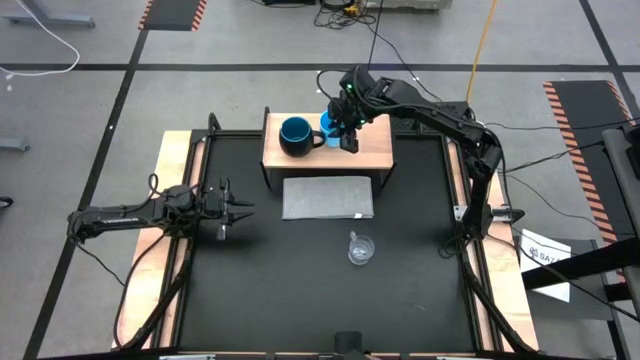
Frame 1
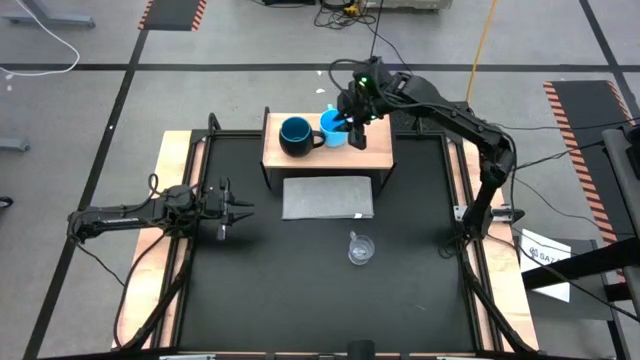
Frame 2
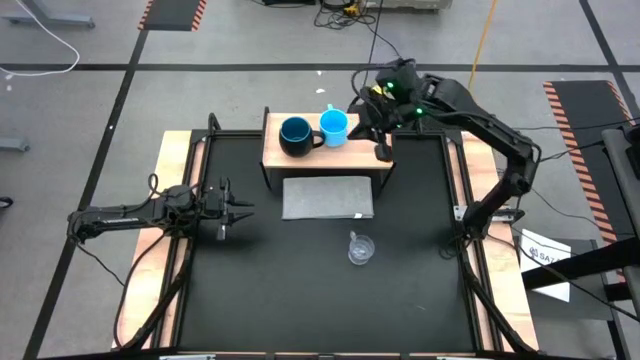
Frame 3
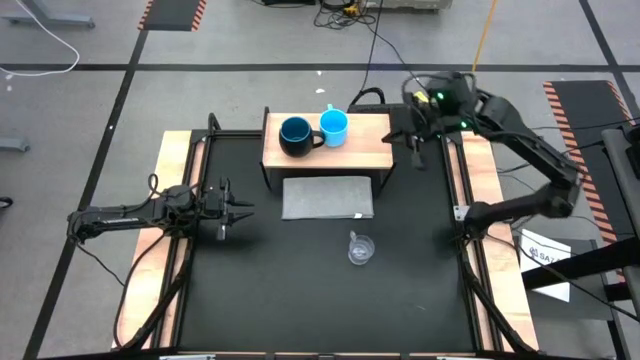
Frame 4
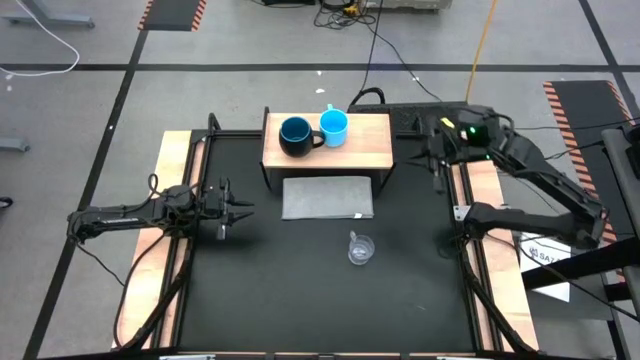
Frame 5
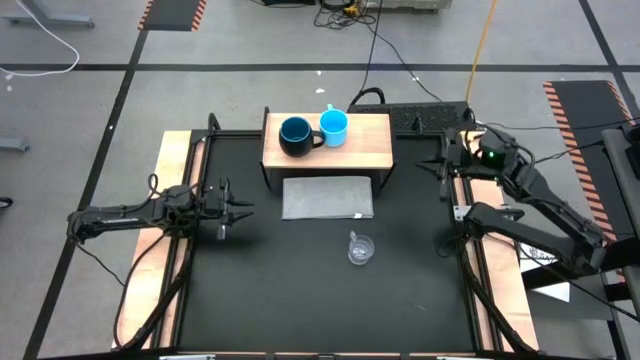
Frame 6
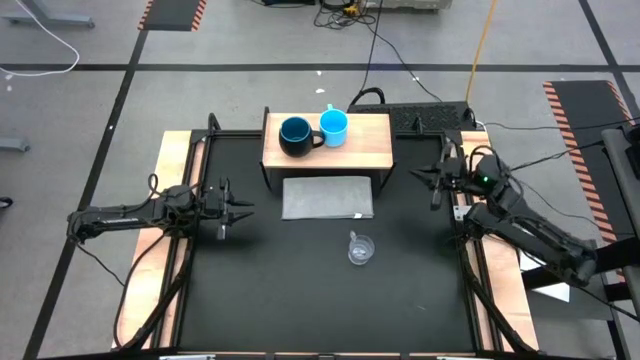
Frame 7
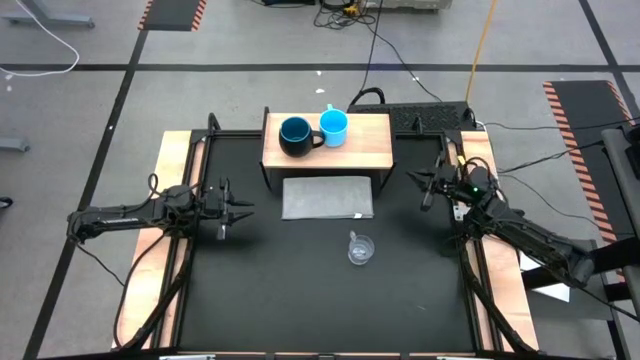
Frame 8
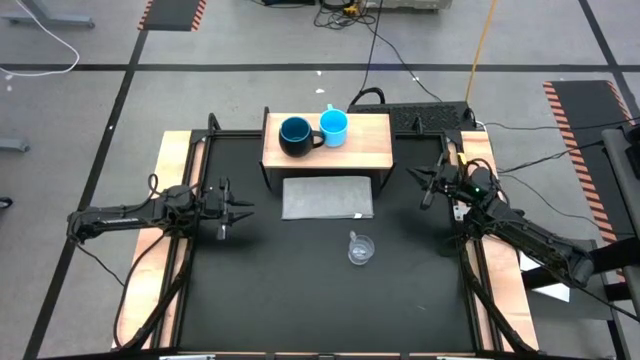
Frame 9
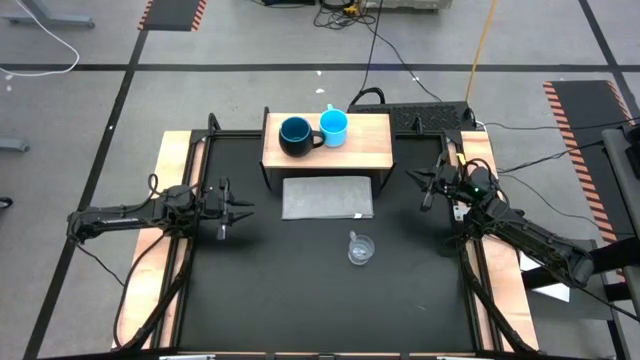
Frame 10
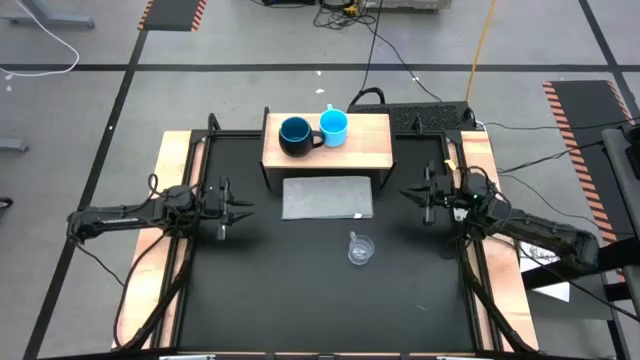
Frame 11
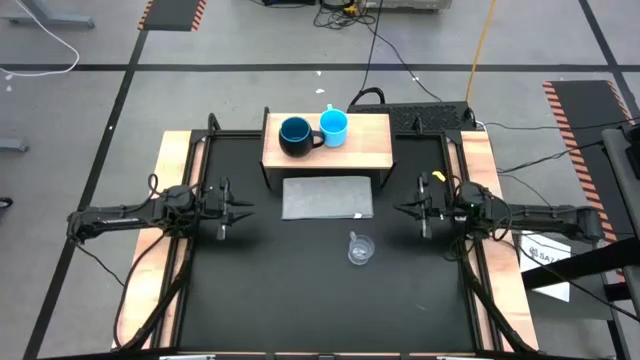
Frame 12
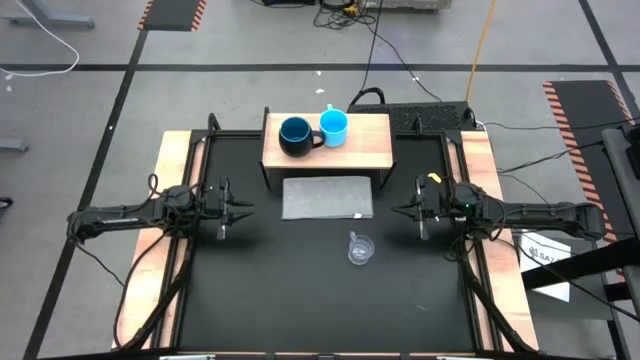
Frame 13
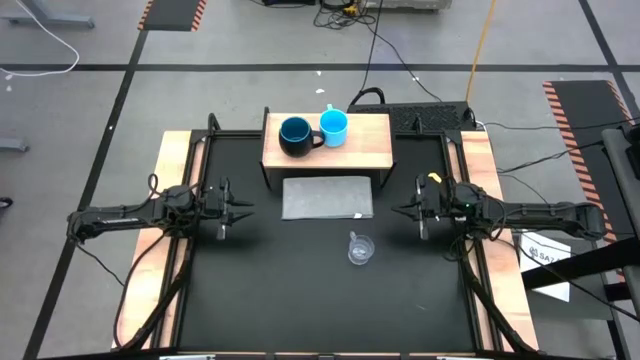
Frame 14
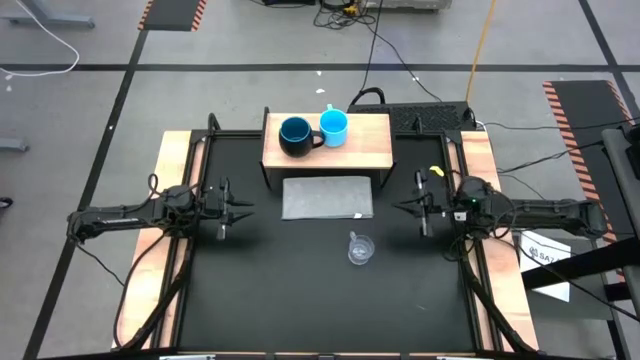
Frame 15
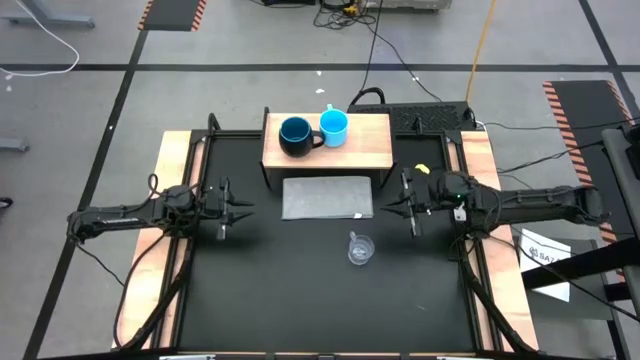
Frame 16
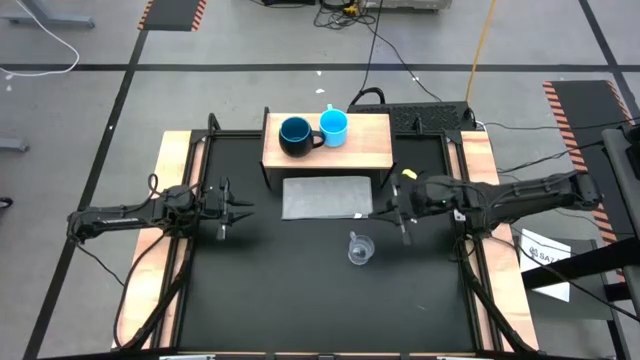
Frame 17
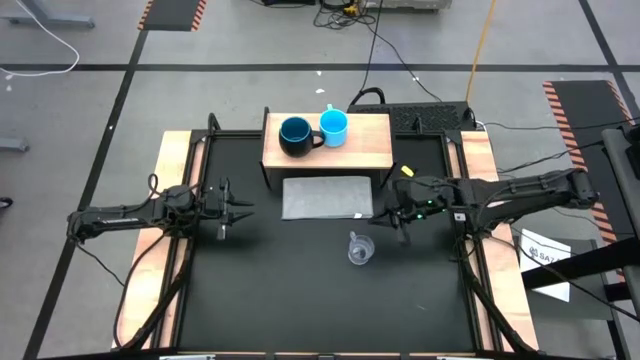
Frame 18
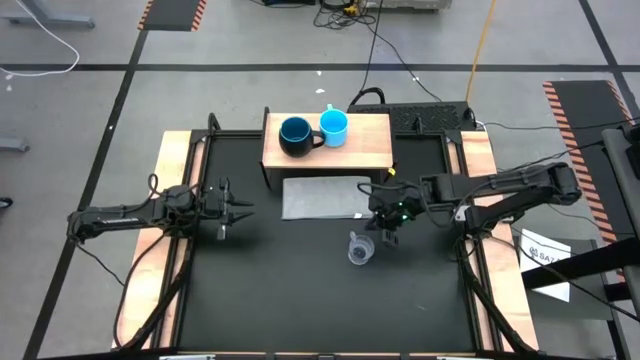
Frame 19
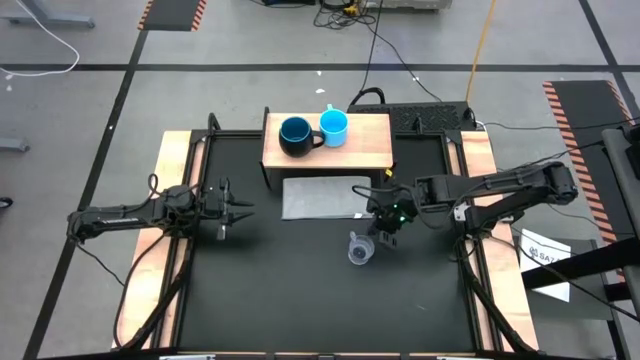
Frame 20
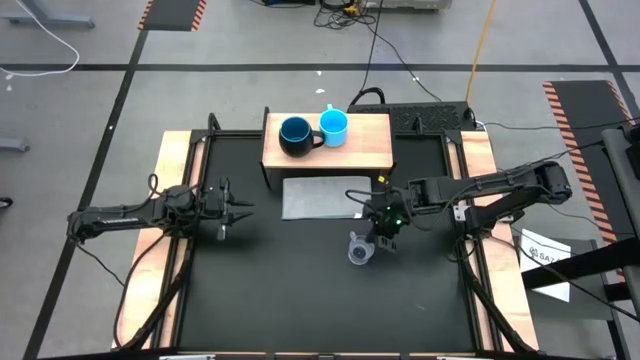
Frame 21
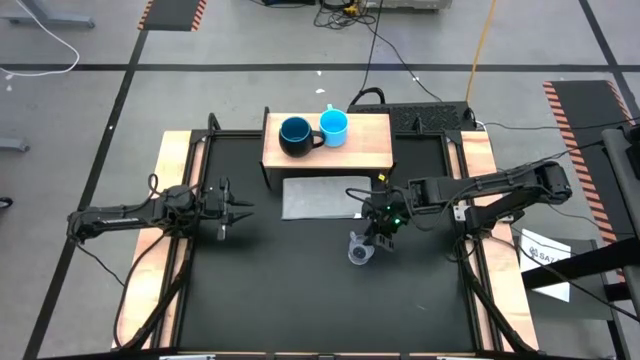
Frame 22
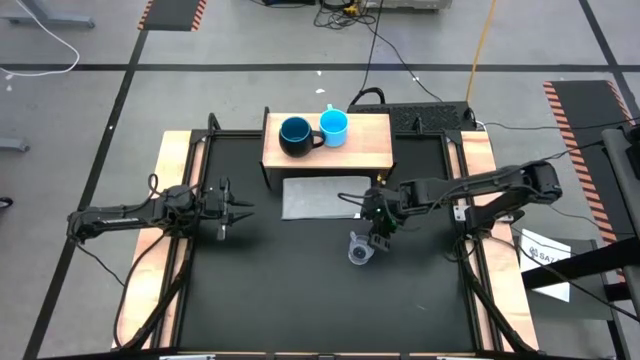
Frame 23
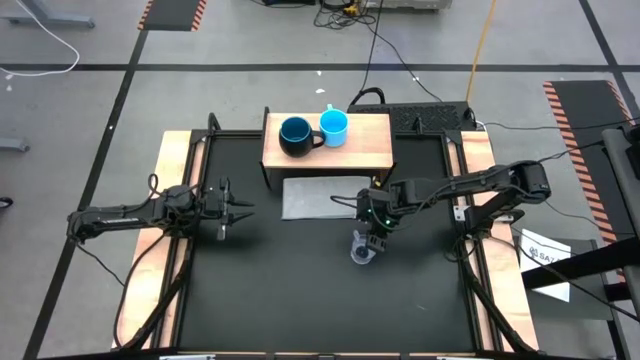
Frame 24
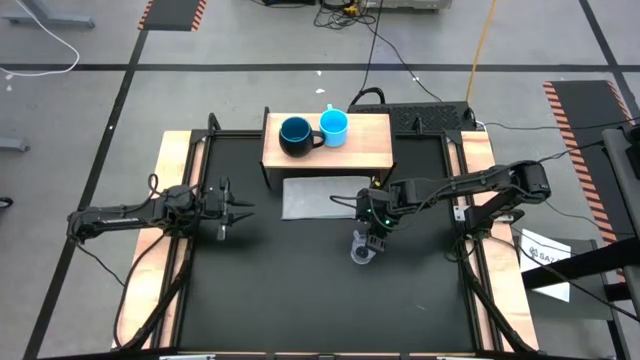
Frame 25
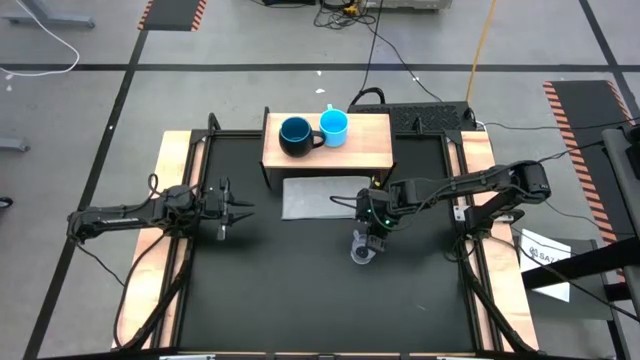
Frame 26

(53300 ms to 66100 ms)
Task: Stack small to large cups/mugs on shelf
Put the transparent mug on the shelf

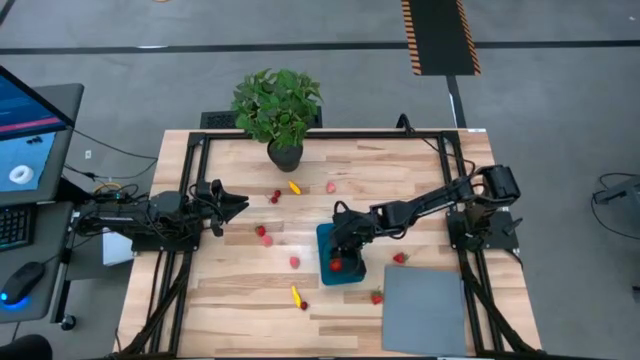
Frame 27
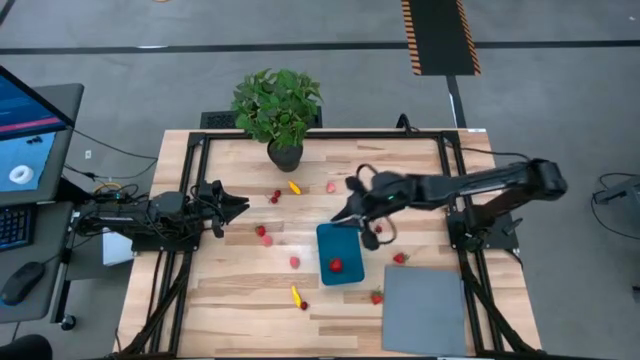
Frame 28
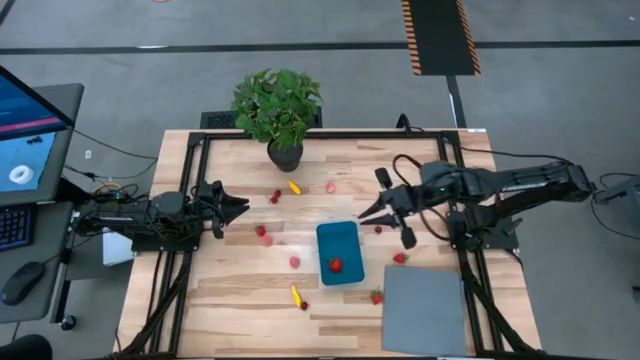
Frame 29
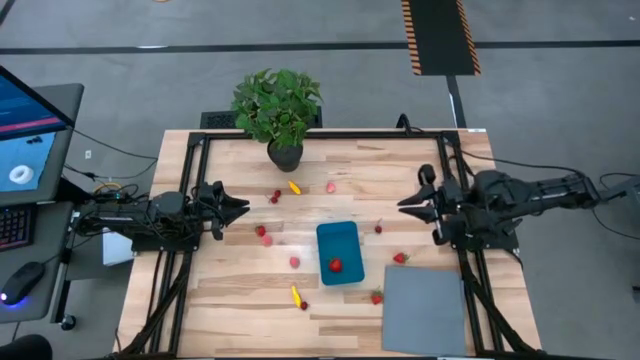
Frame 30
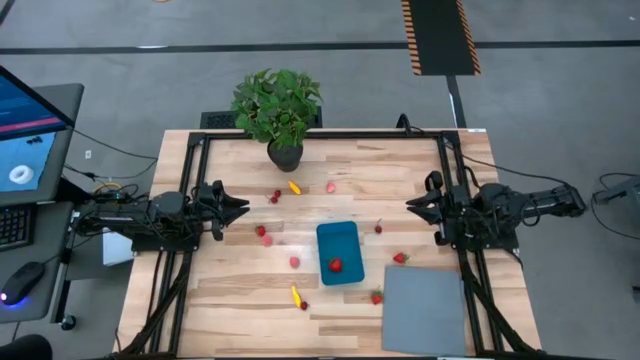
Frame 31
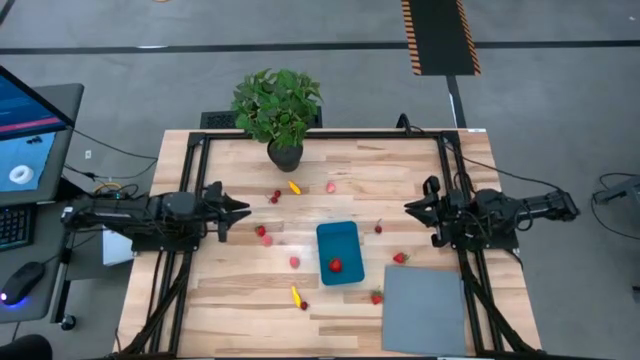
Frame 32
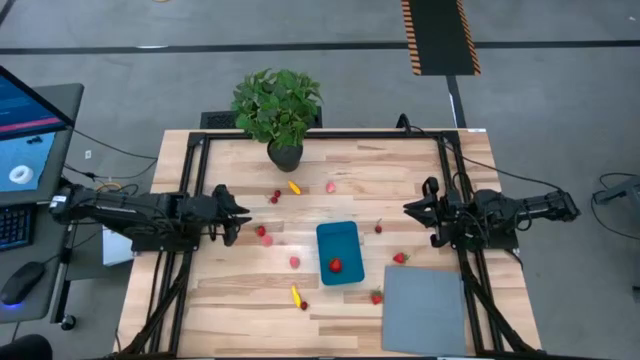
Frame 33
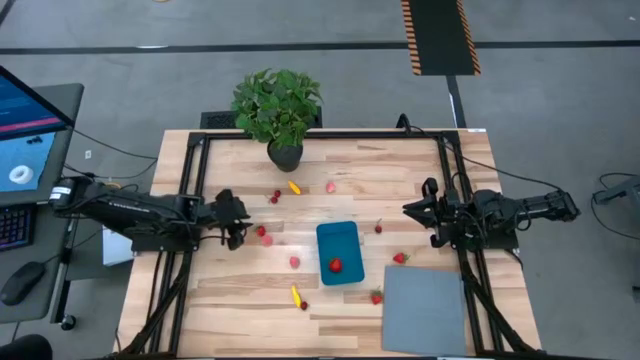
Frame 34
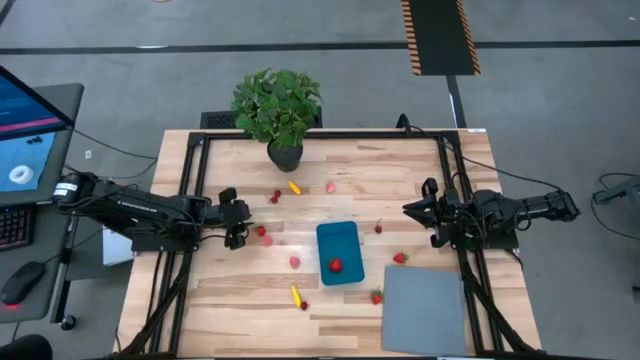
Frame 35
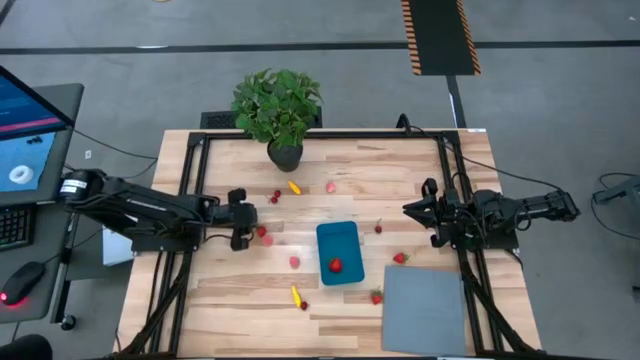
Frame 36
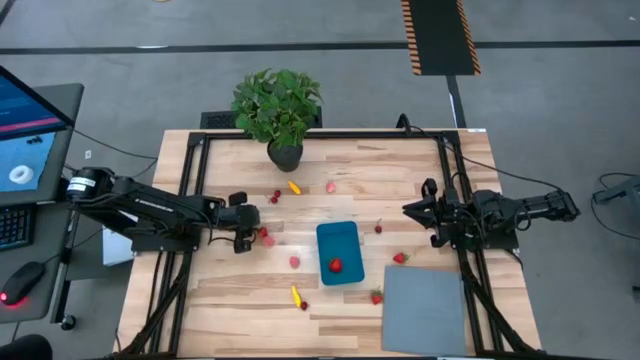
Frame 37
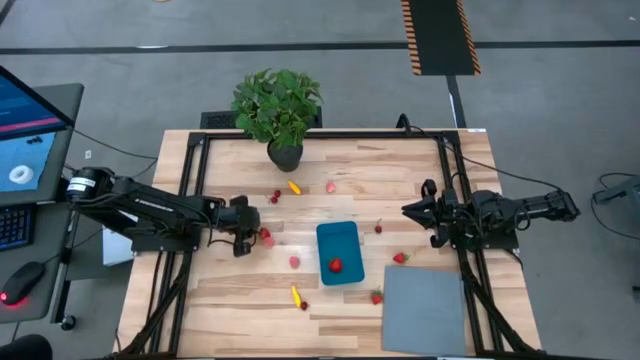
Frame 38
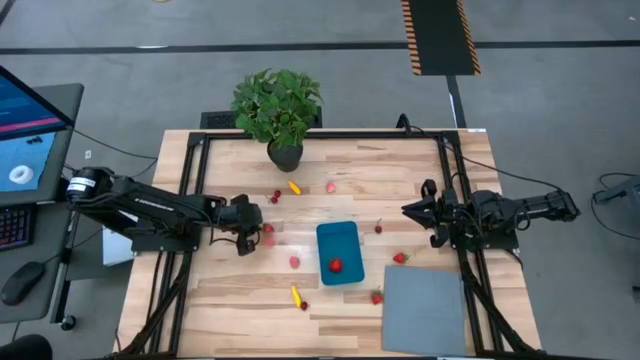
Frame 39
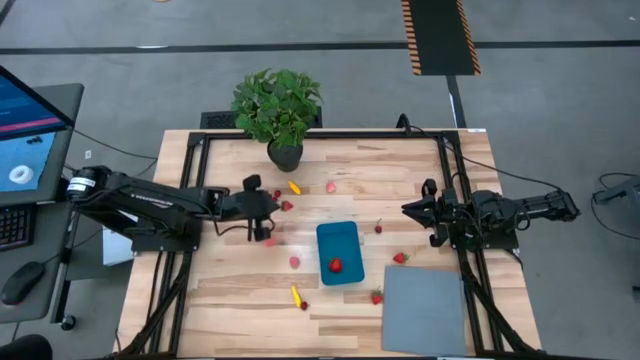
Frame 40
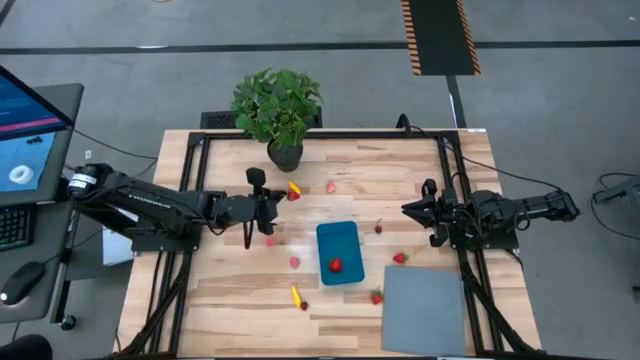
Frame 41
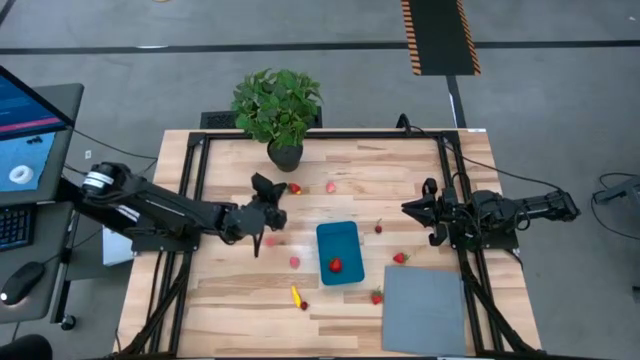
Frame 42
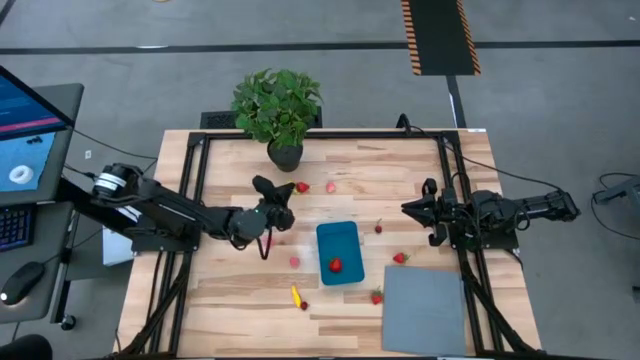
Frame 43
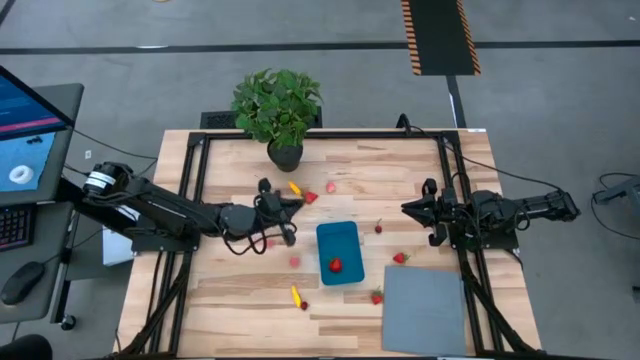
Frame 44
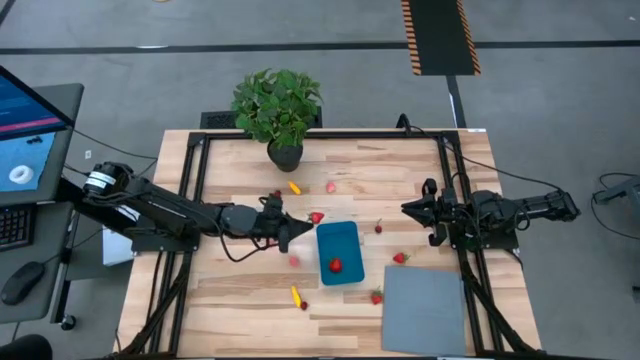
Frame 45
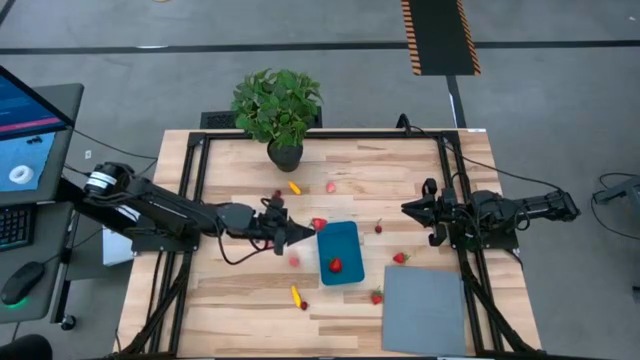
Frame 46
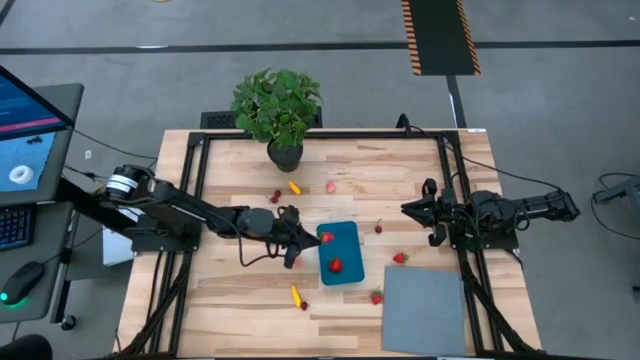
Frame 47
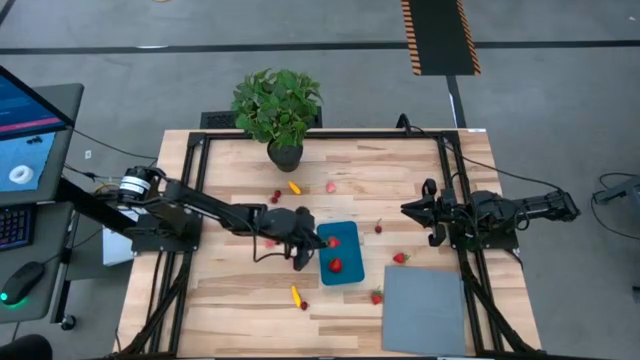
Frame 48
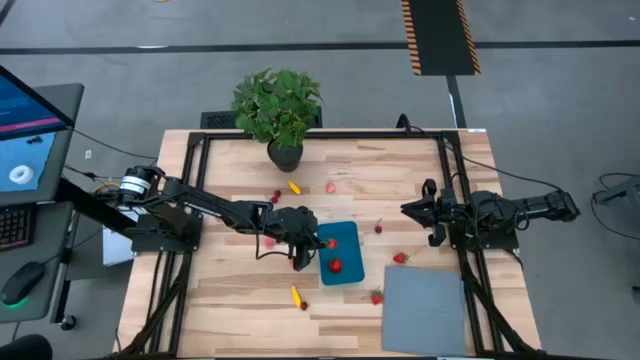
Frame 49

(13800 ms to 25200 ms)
Task: Pick and placing Produce into tupperware
Put the left strawberry into the blue bin
